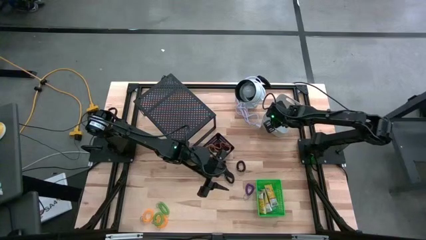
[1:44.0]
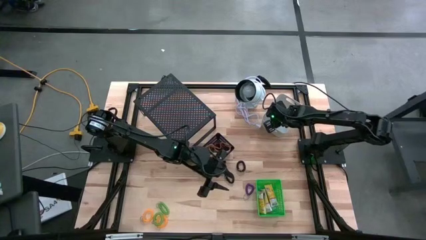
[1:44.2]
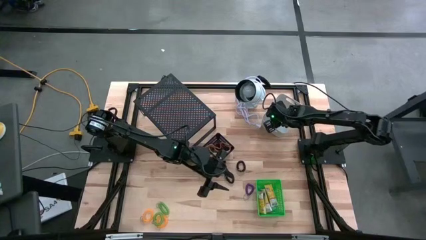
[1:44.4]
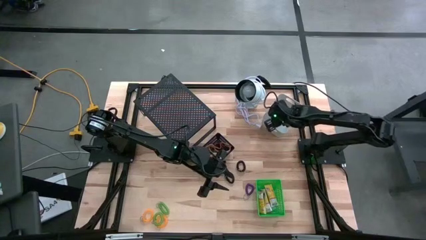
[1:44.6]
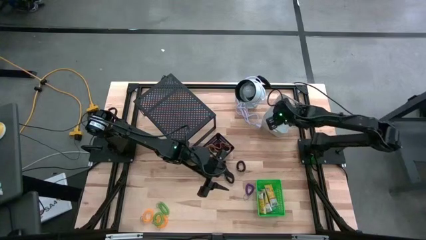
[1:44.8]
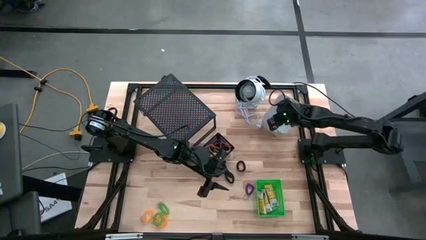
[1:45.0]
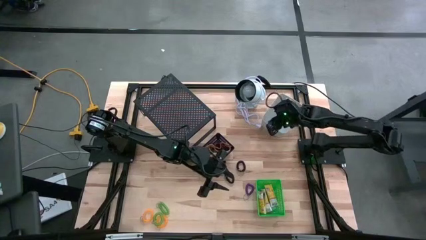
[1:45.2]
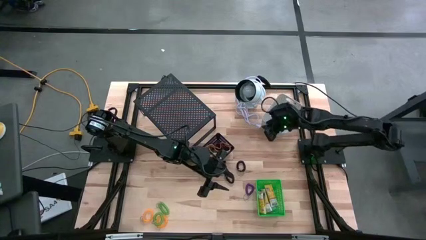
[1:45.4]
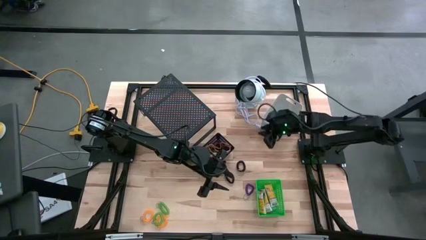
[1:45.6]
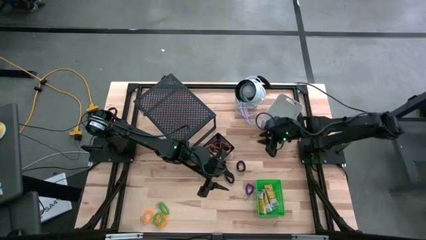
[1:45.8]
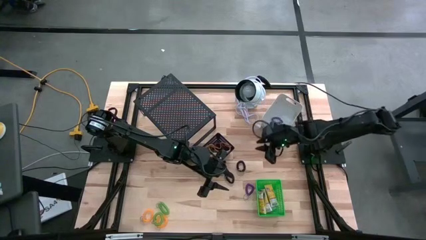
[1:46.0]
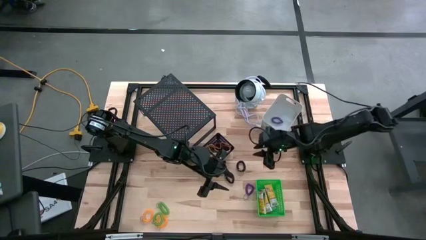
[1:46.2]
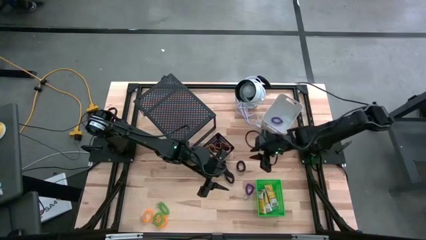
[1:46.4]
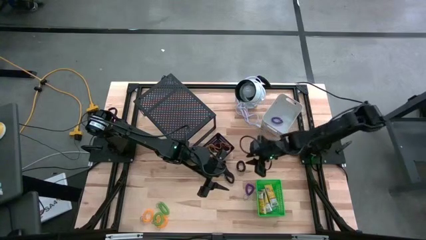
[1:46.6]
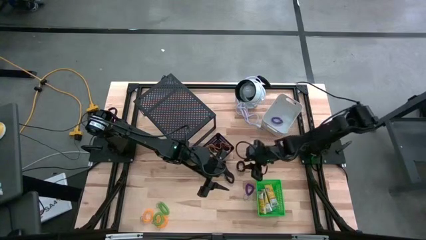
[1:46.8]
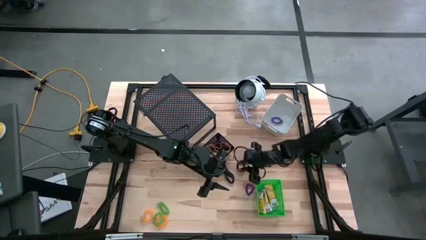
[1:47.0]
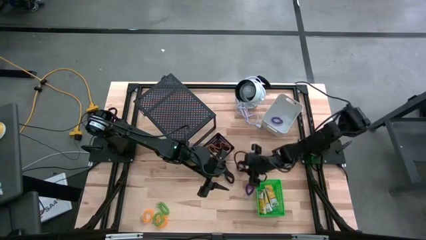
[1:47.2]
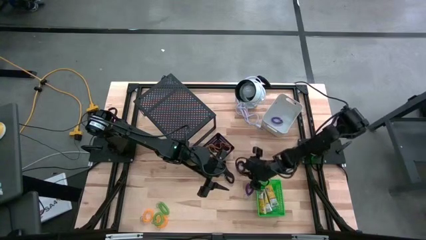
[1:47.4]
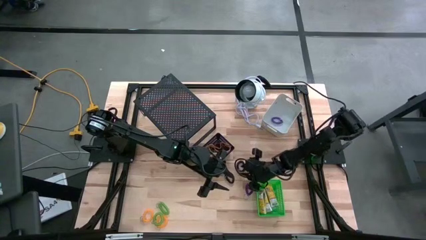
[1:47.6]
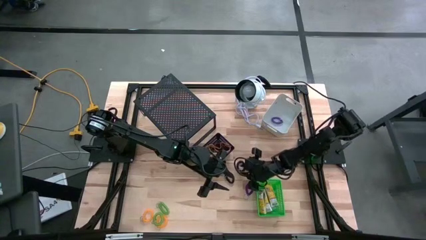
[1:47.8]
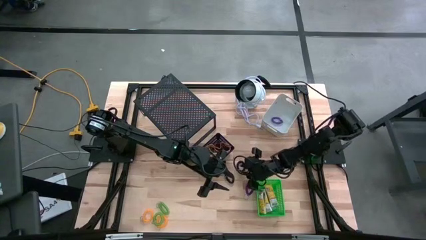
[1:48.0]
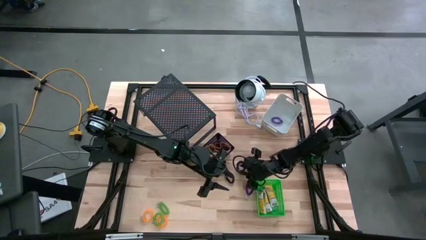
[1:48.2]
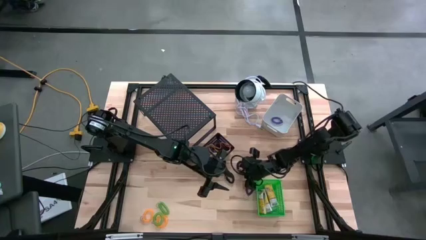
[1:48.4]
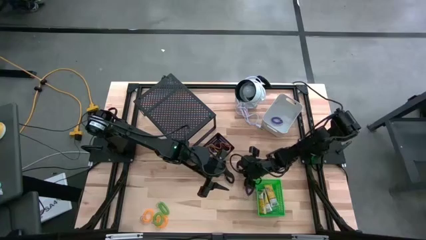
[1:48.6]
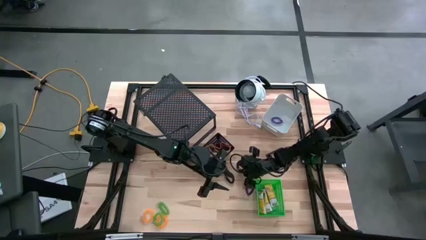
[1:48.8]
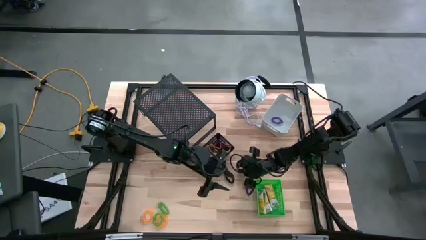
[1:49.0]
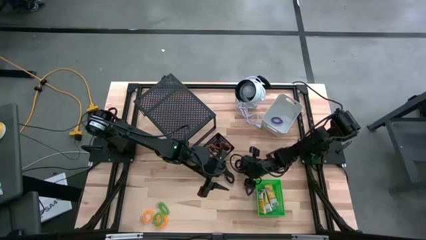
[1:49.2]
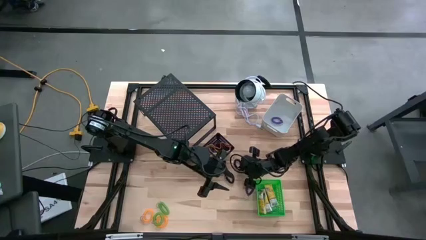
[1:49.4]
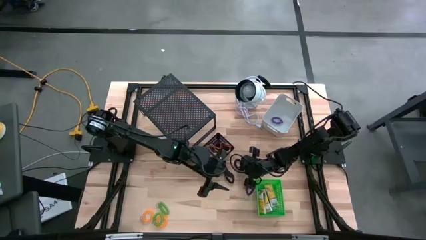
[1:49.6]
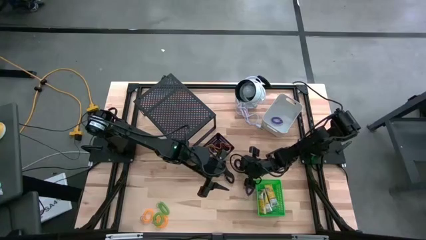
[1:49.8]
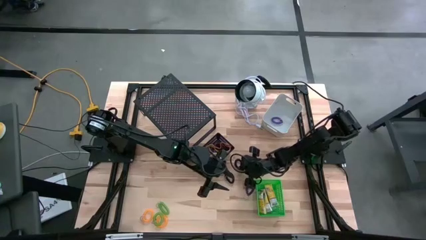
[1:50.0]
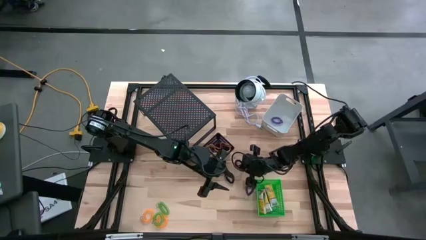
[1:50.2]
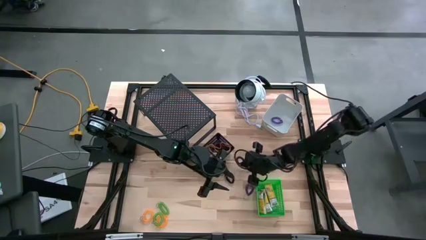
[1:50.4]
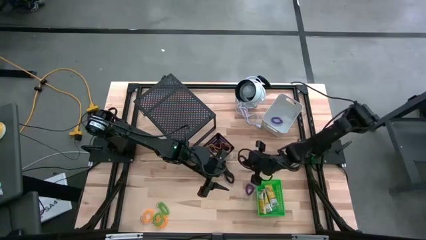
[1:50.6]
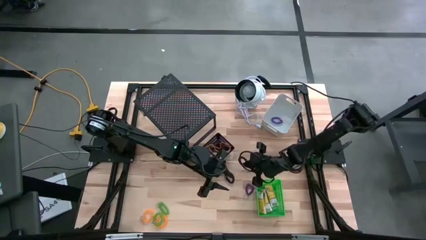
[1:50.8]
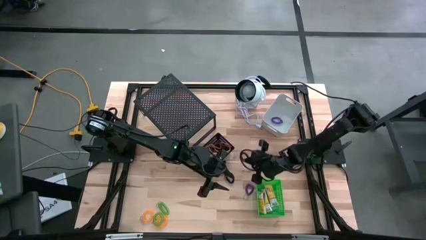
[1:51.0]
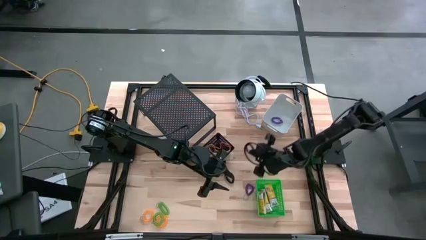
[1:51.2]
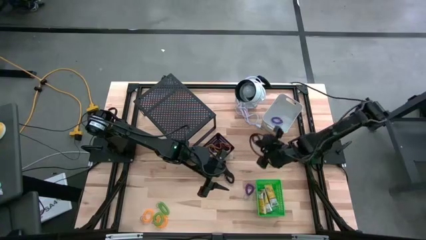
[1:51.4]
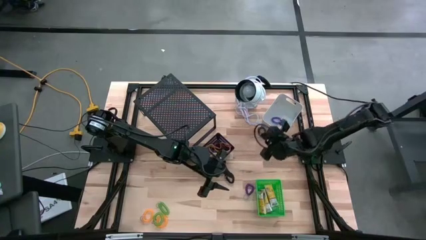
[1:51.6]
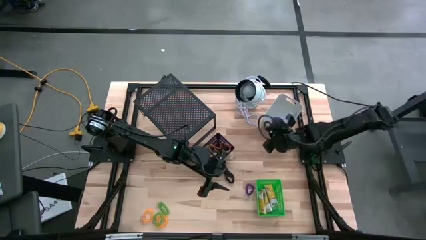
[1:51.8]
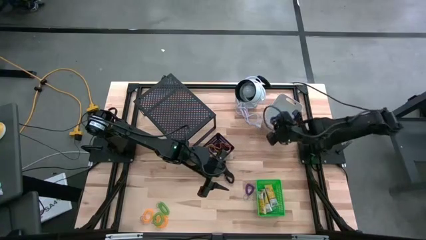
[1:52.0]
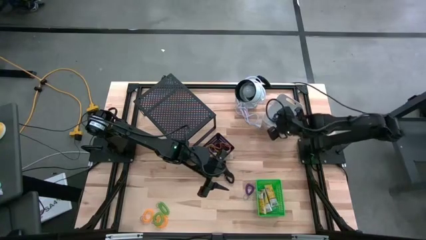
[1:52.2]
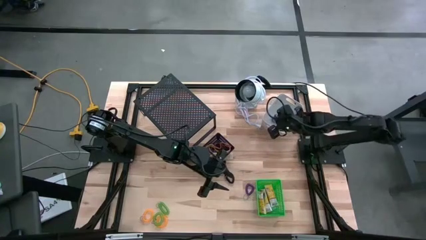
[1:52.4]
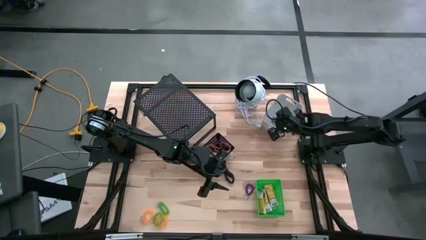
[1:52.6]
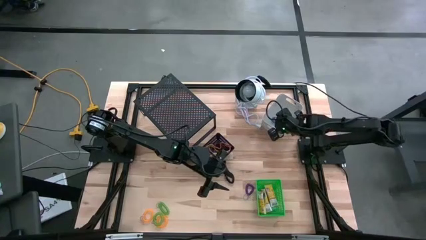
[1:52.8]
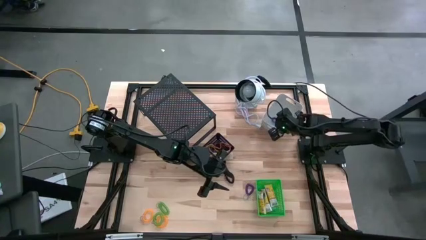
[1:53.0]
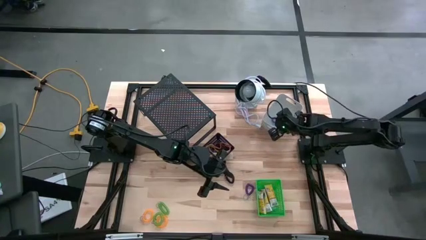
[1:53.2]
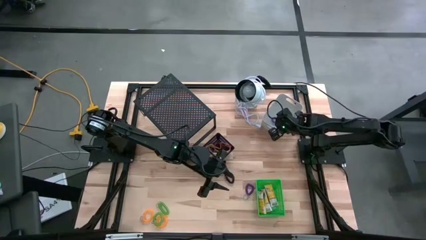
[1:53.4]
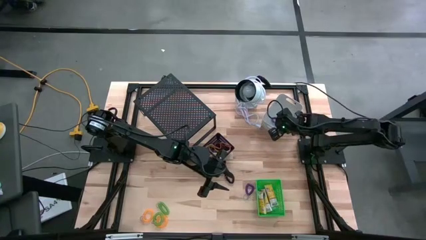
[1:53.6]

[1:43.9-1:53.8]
Task: Pick & Place Office Desk Supplies
Put the right black spring keychain into the white bin

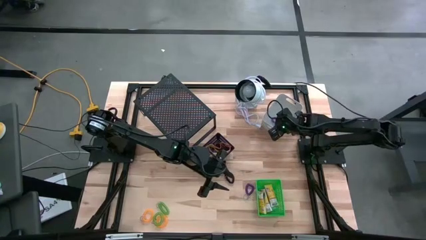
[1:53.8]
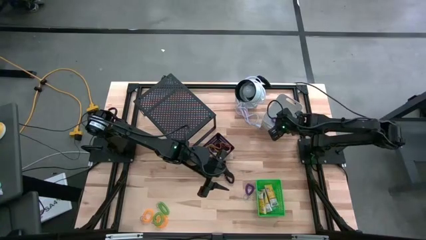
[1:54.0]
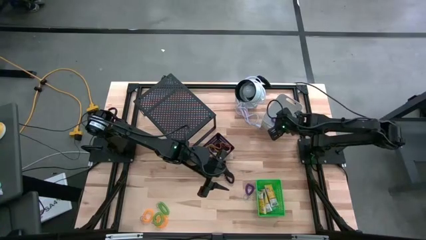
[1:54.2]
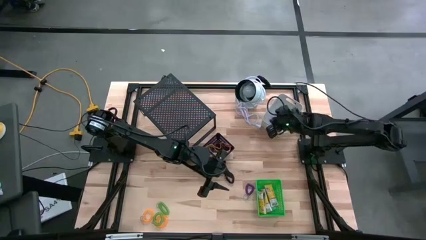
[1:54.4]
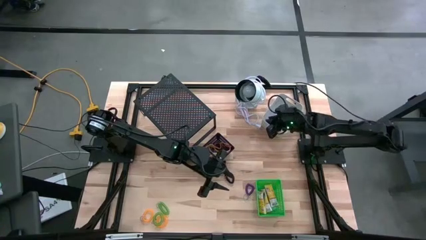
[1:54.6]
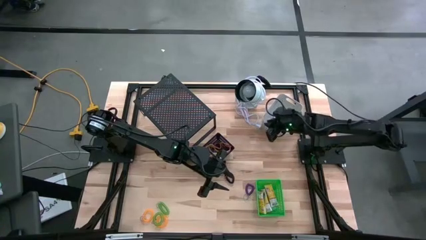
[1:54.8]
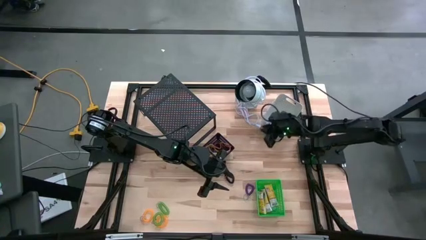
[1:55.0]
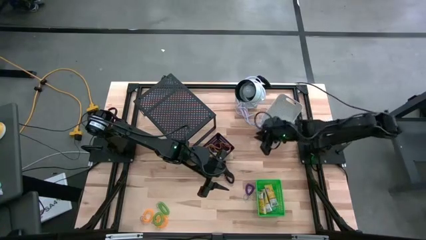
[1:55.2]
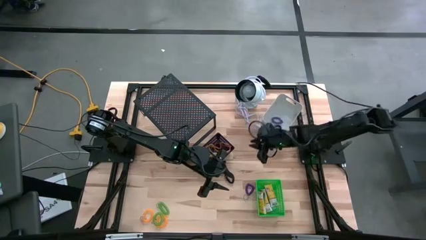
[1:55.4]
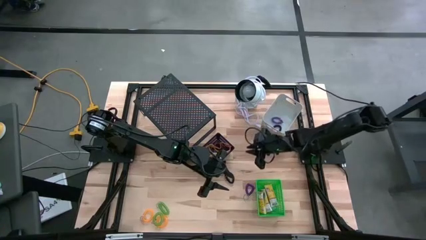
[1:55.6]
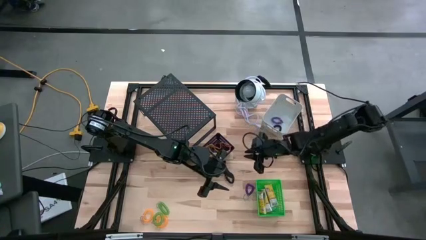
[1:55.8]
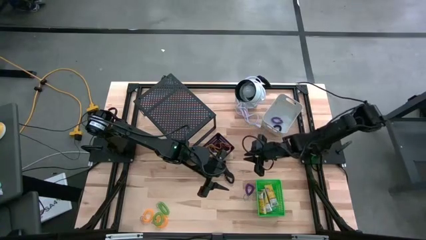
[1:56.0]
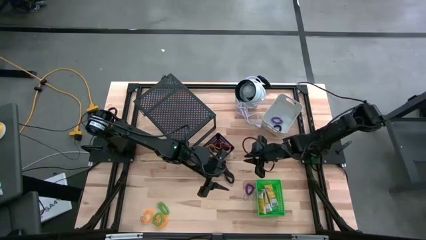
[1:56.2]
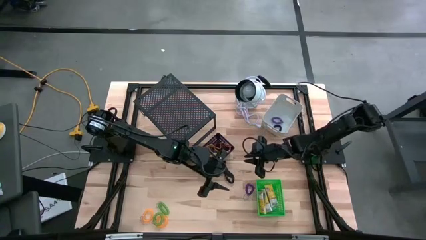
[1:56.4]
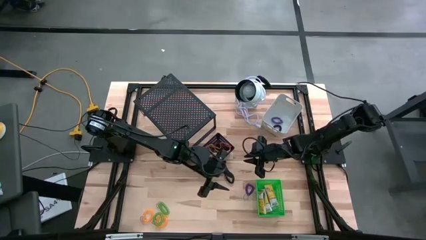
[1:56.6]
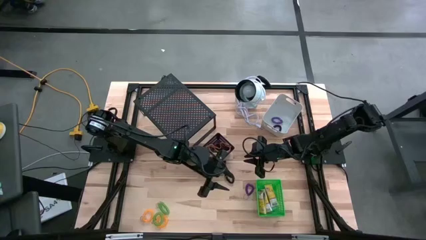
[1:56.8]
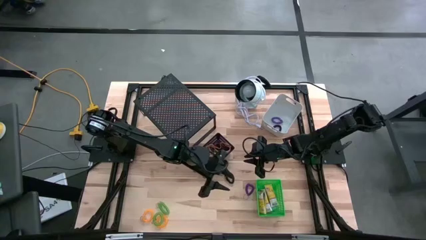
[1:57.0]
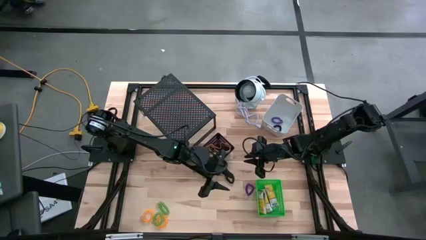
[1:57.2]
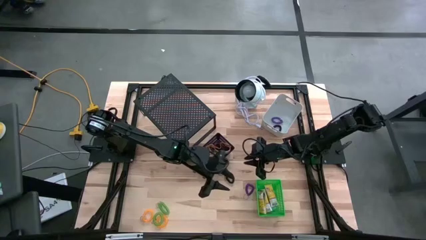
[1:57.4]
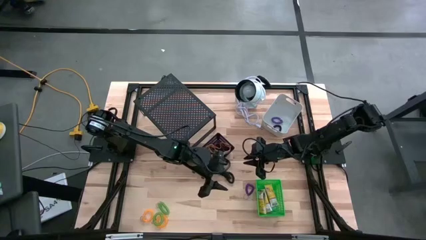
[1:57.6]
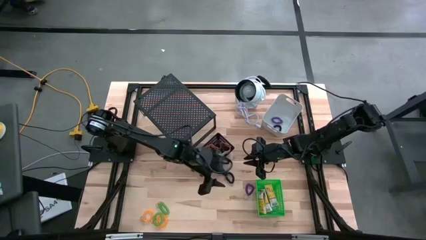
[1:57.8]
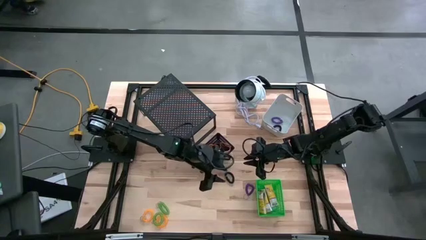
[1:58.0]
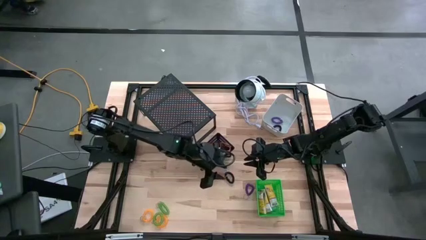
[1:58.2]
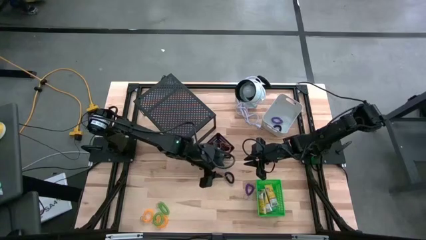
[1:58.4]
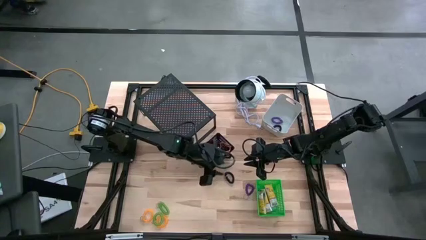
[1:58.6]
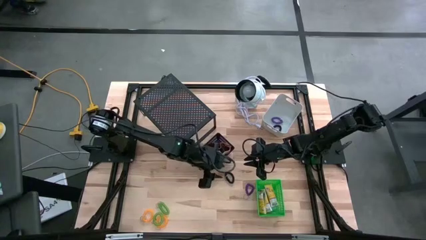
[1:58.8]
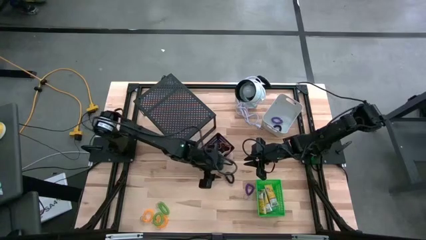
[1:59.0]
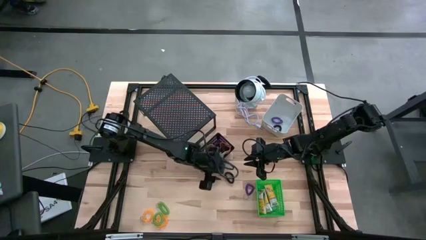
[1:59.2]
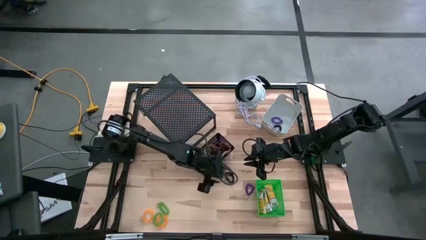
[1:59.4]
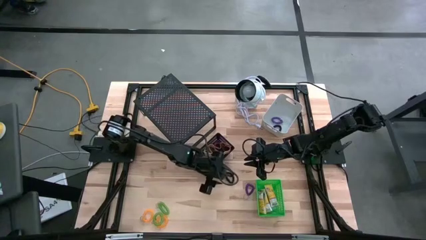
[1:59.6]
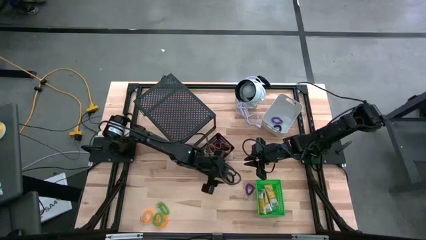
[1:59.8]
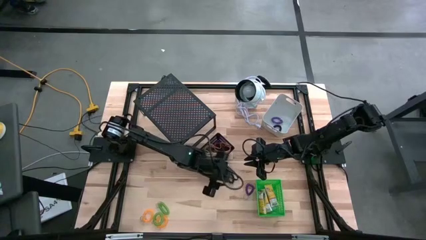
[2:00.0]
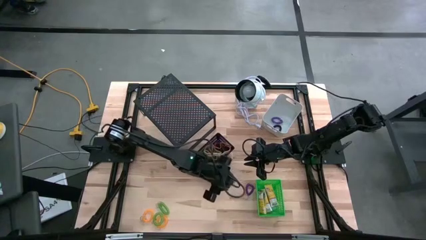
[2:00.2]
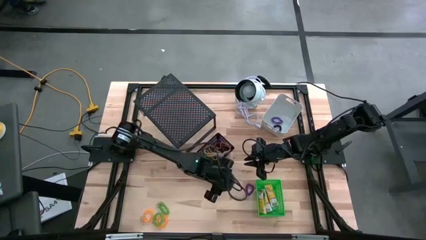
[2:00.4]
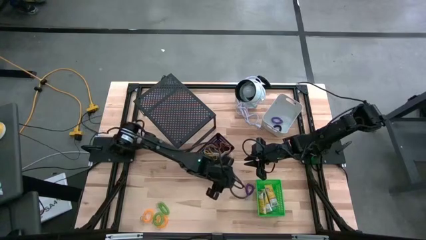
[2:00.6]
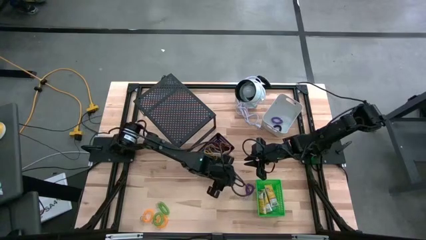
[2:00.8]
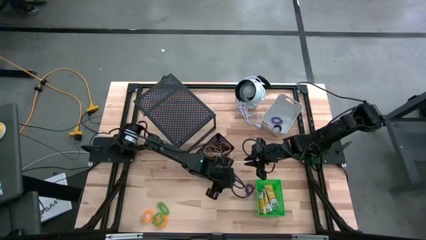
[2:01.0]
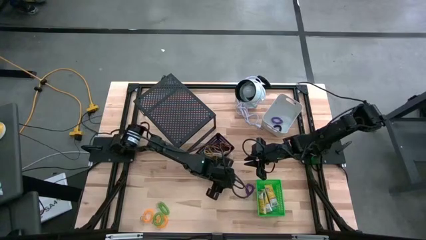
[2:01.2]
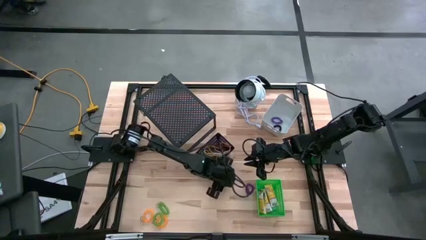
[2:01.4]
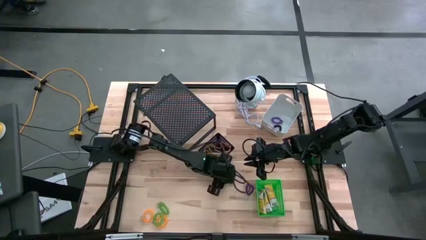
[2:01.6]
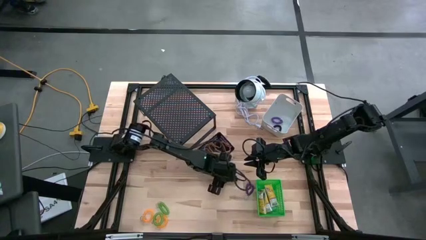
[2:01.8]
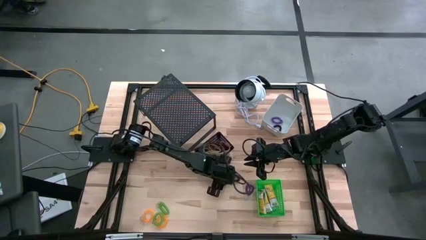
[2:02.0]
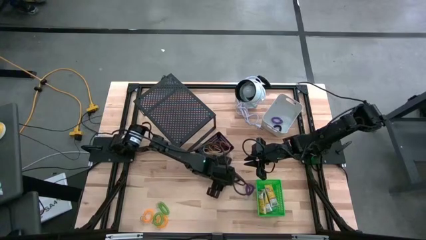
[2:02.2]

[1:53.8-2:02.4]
Put the black spring keychain into the white bin
